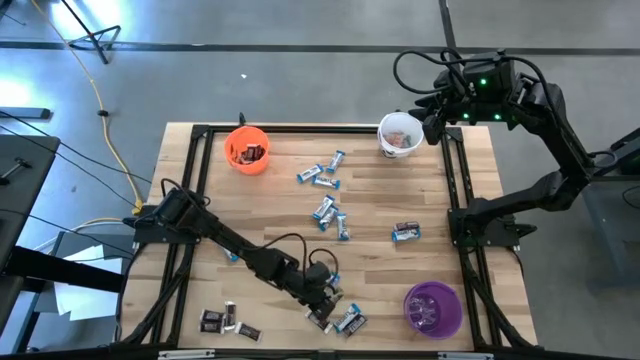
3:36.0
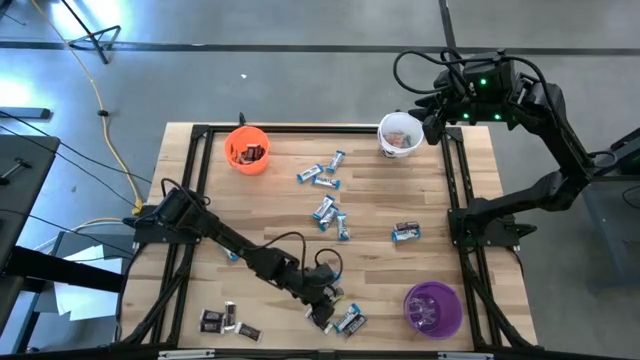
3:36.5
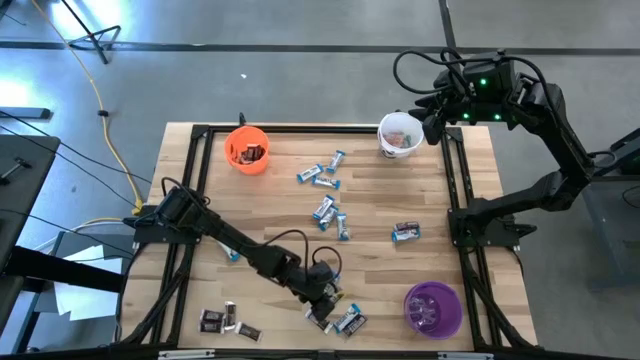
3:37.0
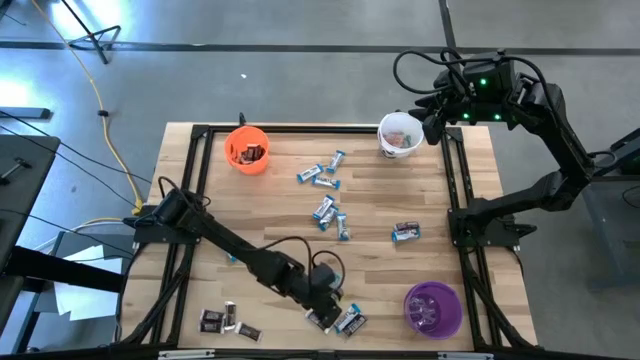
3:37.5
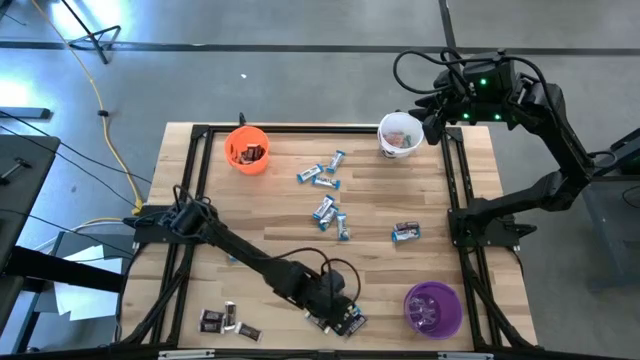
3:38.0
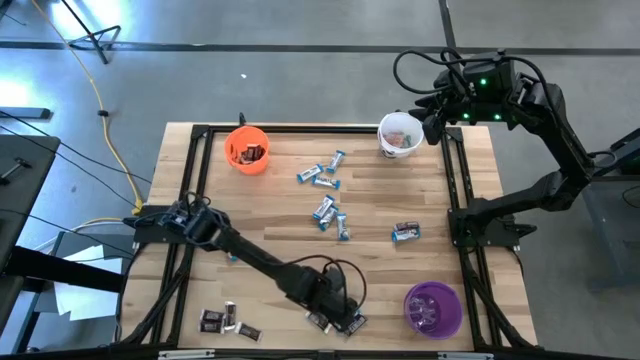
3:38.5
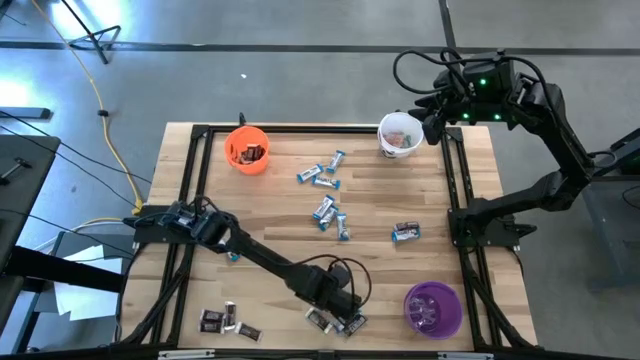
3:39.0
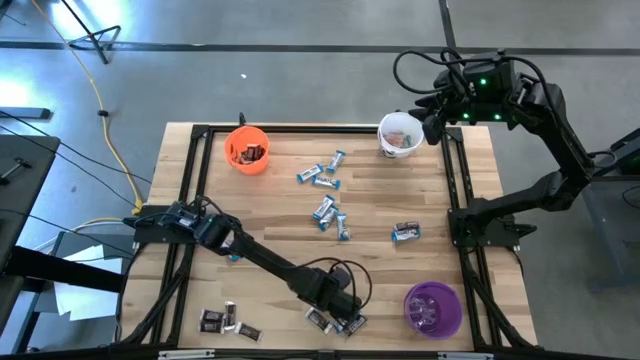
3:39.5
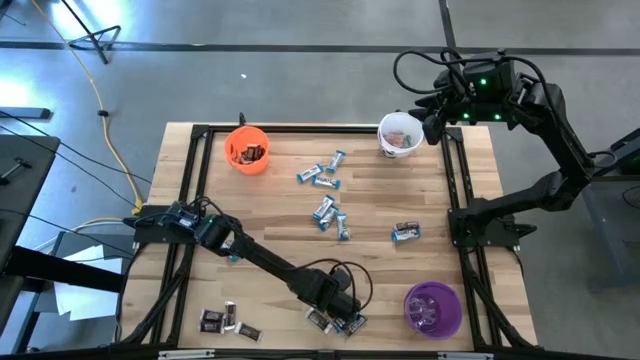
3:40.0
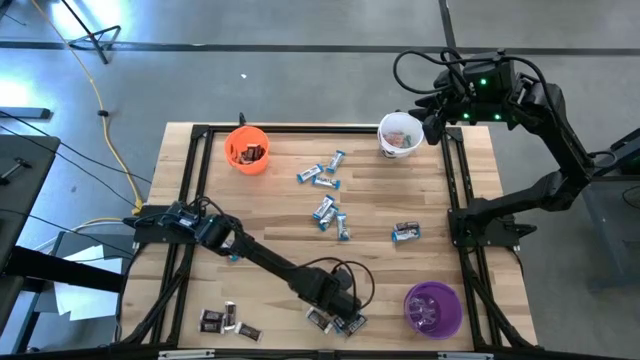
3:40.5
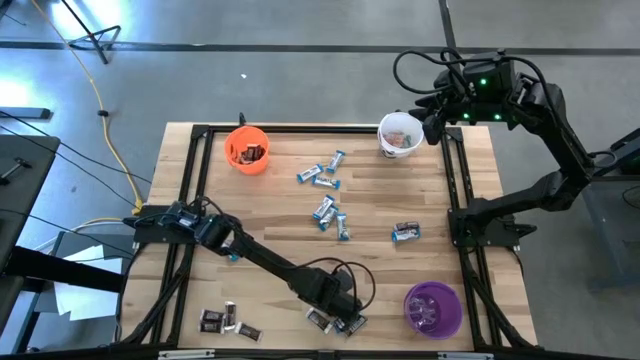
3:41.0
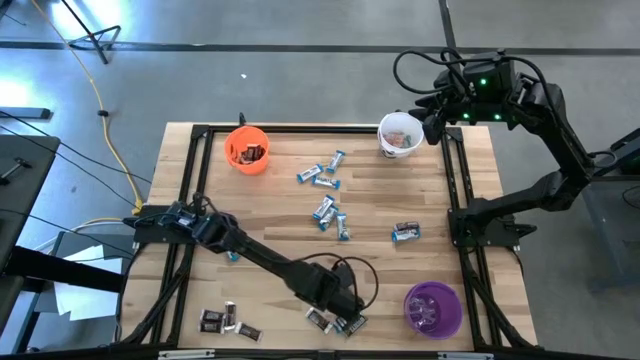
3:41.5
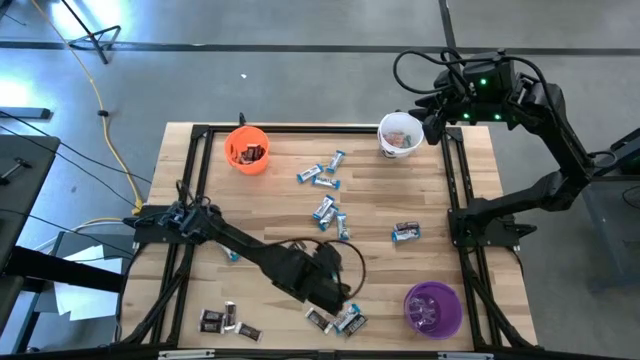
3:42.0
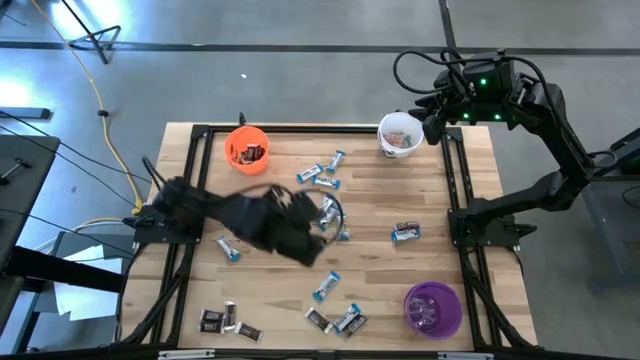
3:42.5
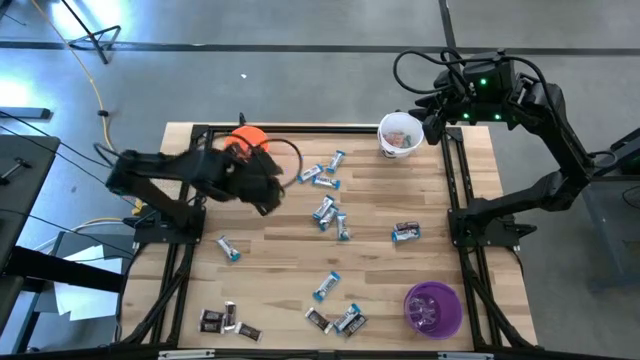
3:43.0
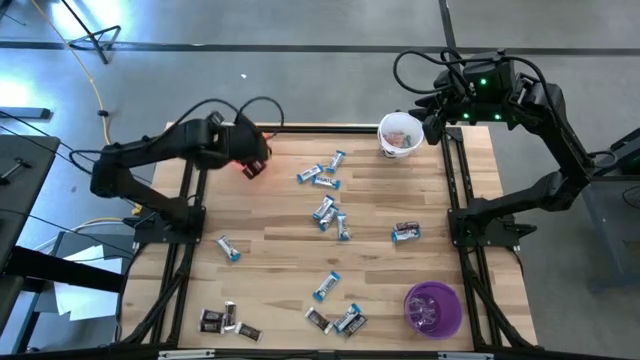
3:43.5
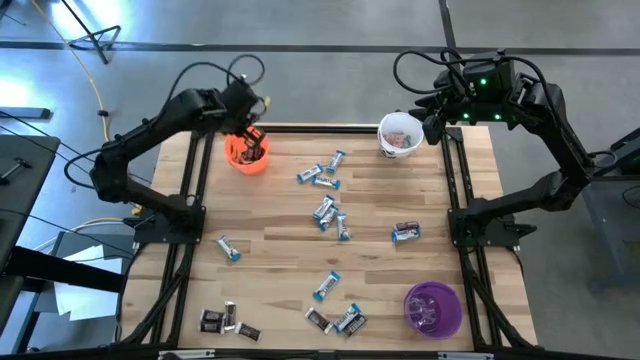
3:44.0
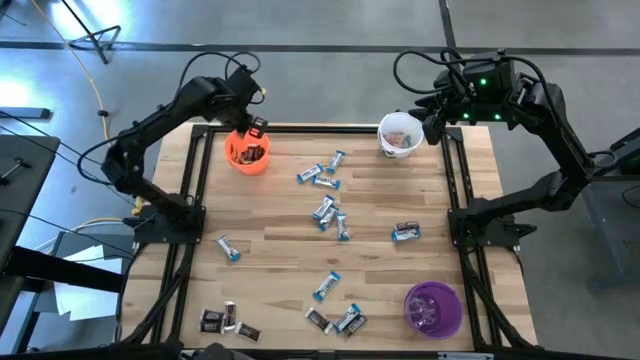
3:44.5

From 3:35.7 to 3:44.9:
Task: Sort candy
Put the brown chocolate into the orange bucket

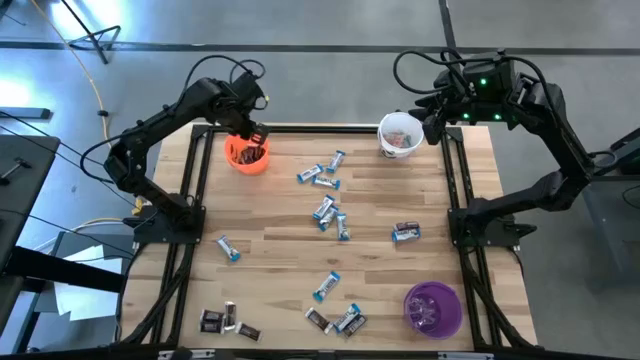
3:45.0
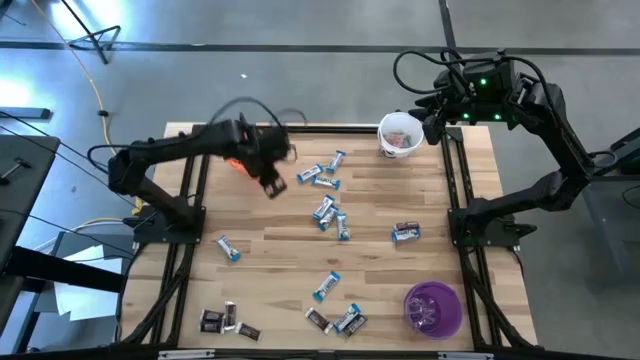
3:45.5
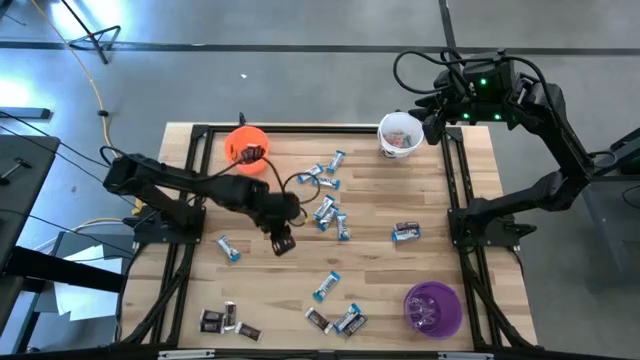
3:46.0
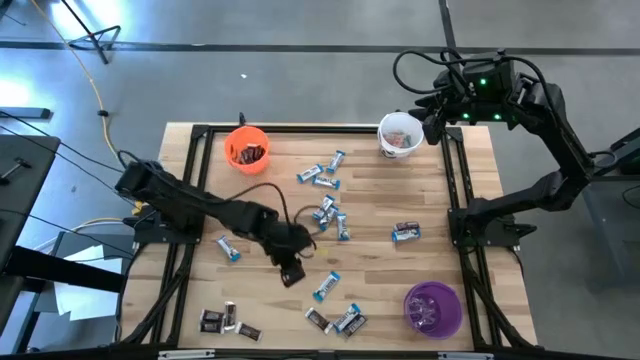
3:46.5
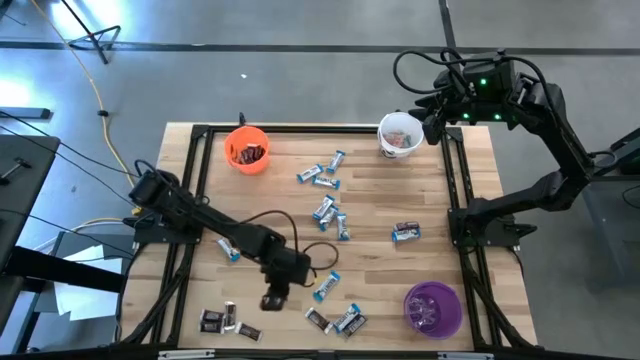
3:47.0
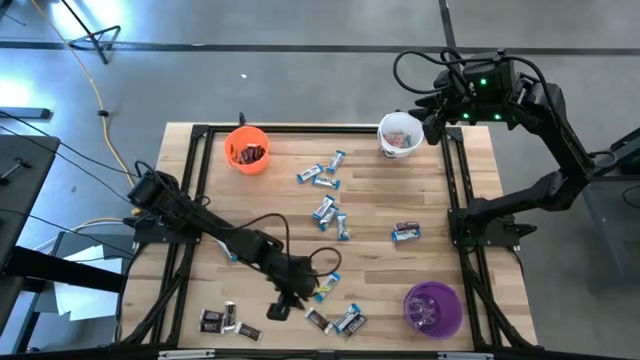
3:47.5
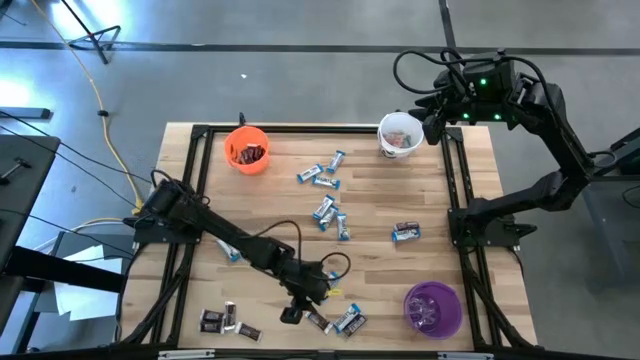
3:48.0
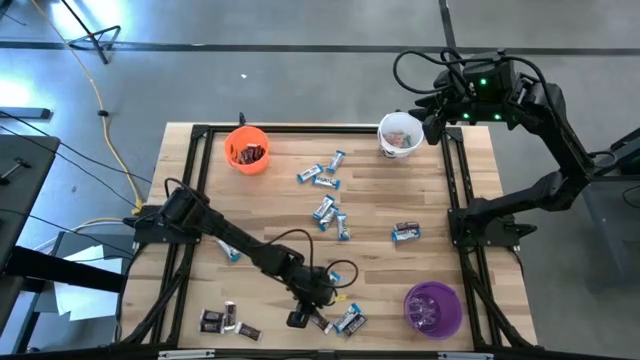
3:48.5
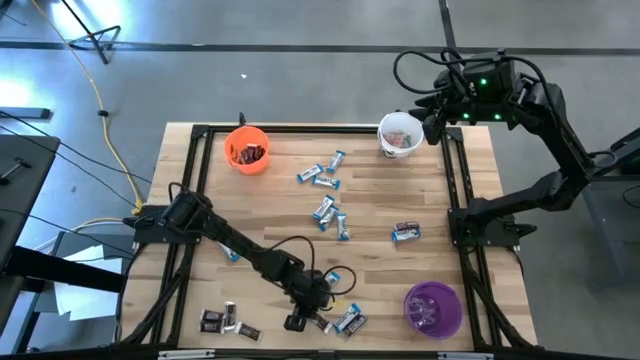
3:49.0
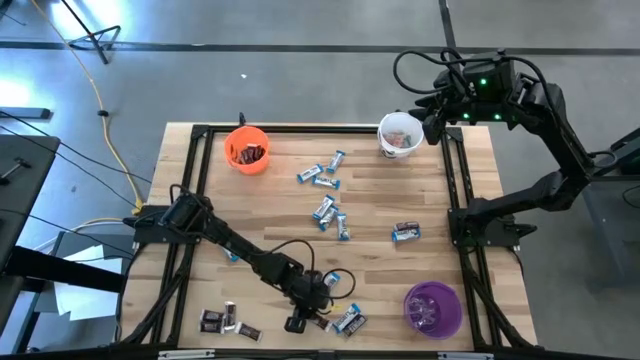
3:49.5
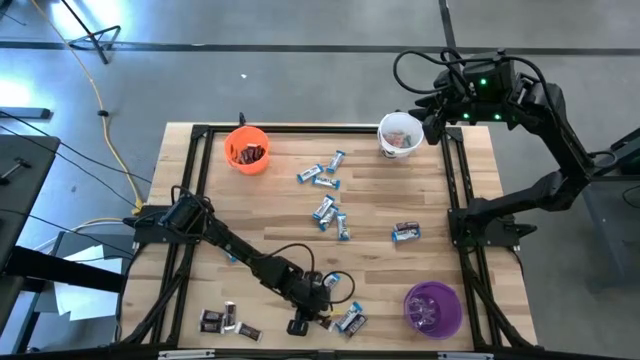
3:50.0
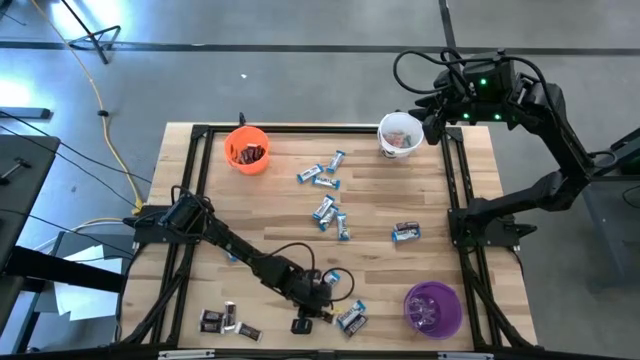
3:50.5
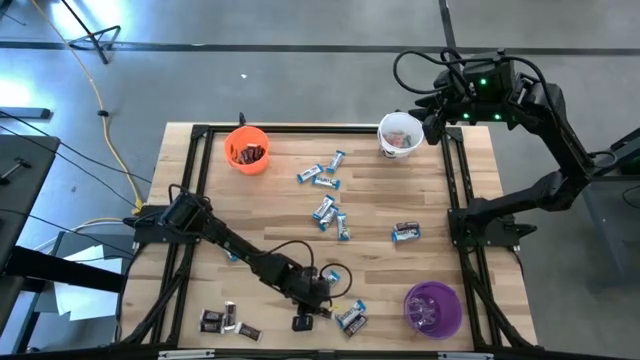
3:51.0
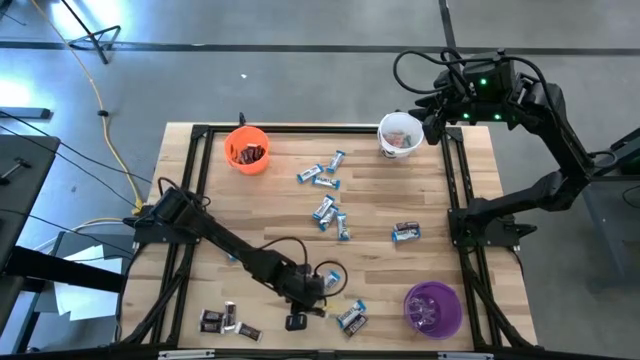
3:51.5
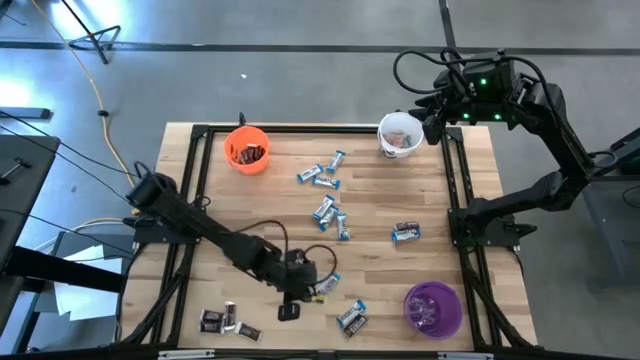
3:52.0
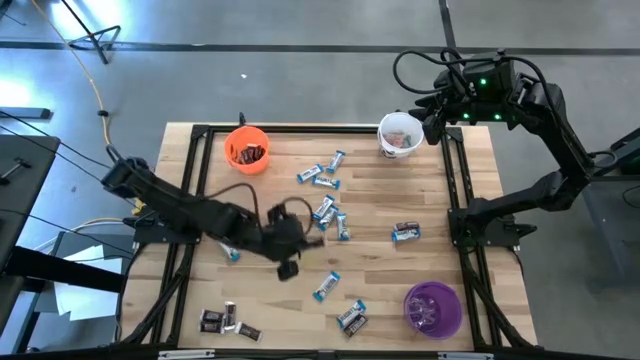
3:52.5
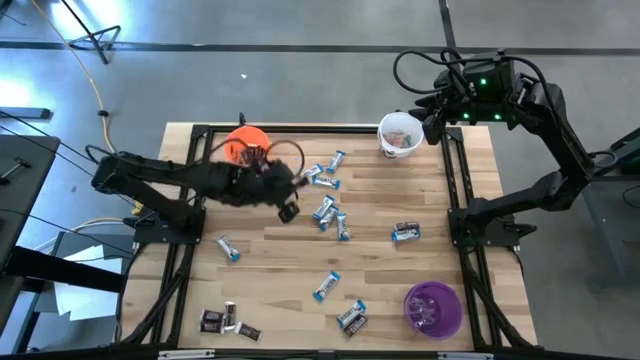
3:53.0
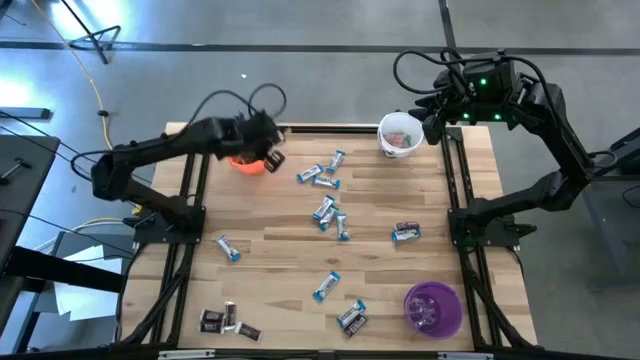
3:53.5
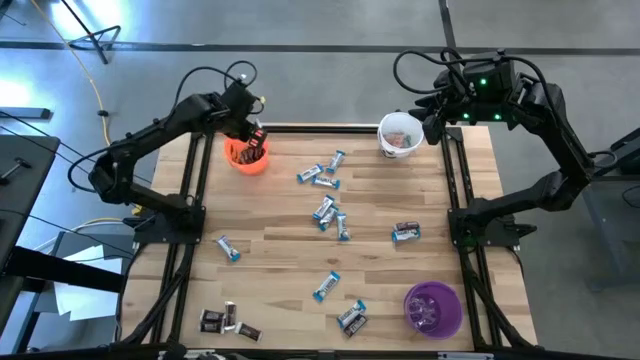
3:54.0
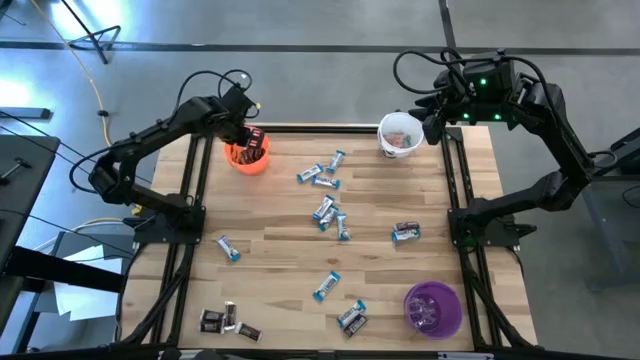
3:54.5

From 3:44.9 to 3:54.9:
Put the brown chocolate into the orange bucket

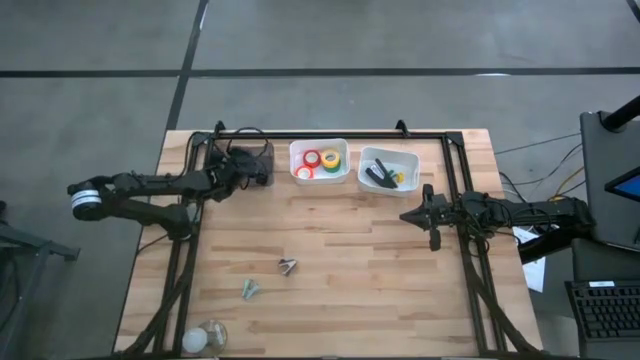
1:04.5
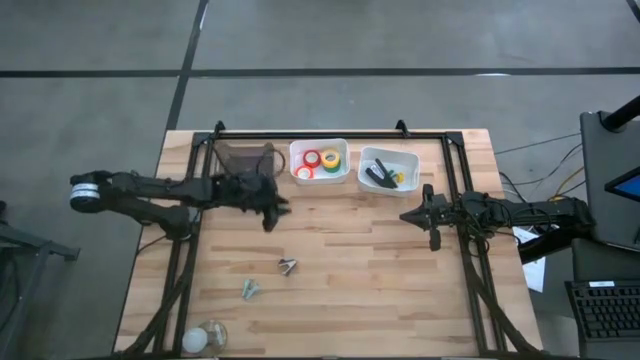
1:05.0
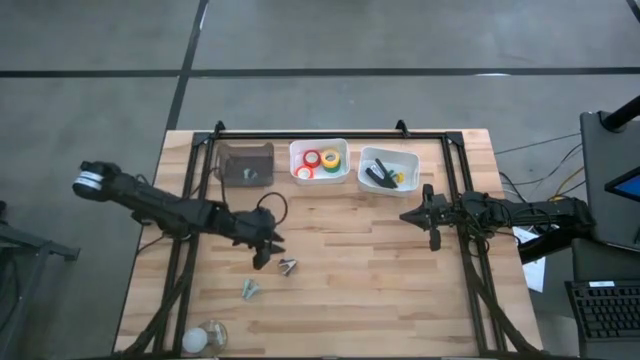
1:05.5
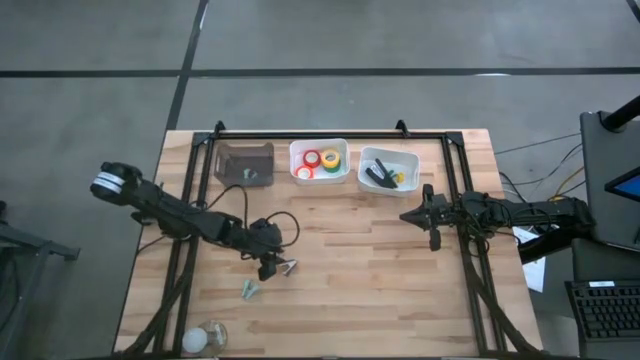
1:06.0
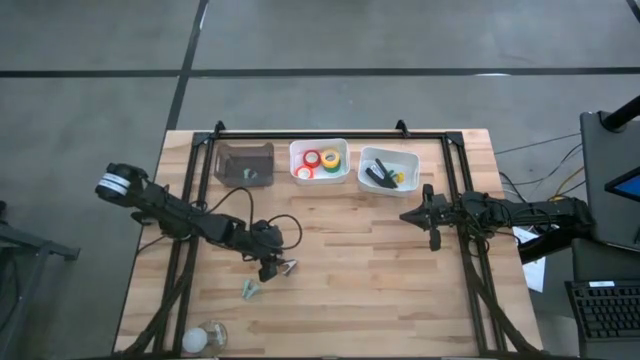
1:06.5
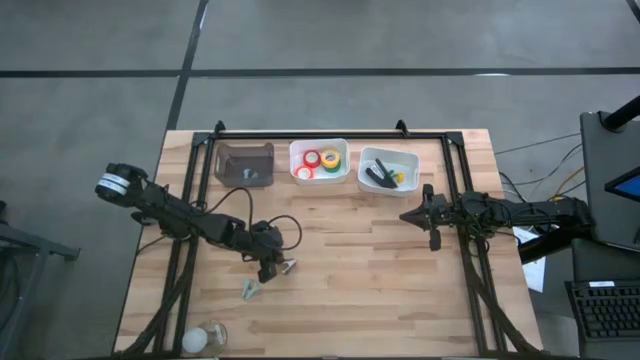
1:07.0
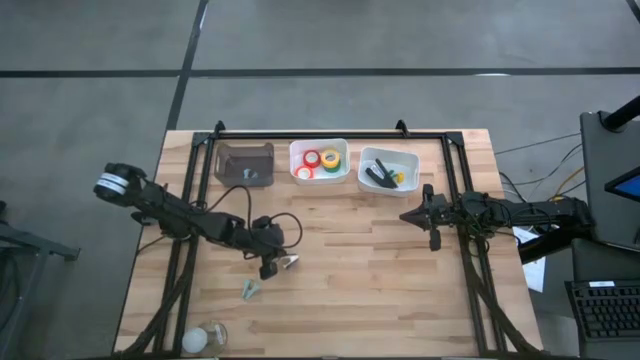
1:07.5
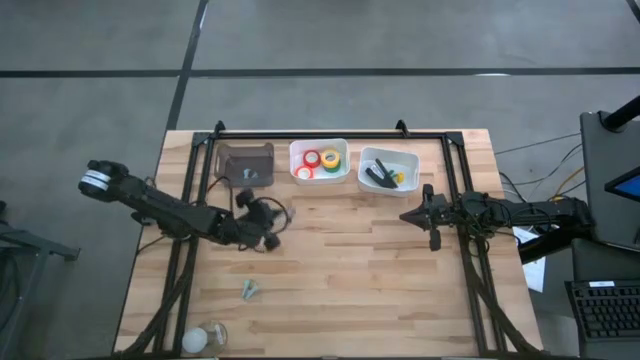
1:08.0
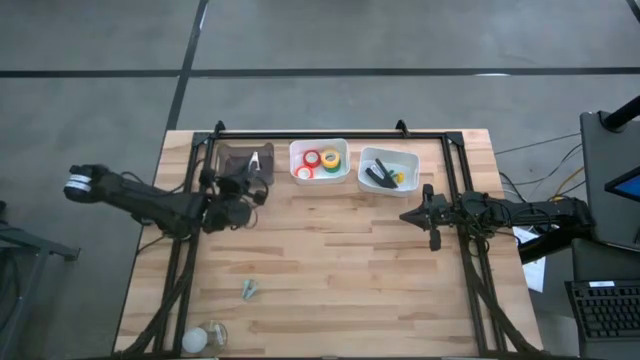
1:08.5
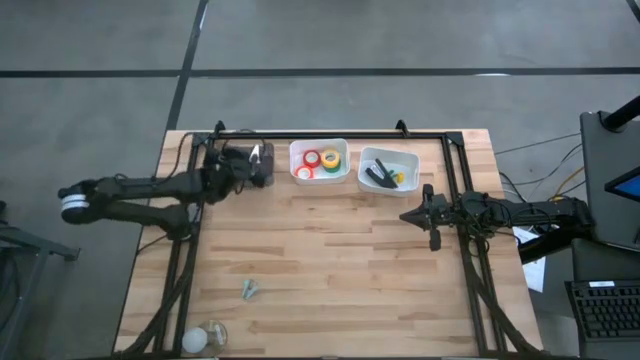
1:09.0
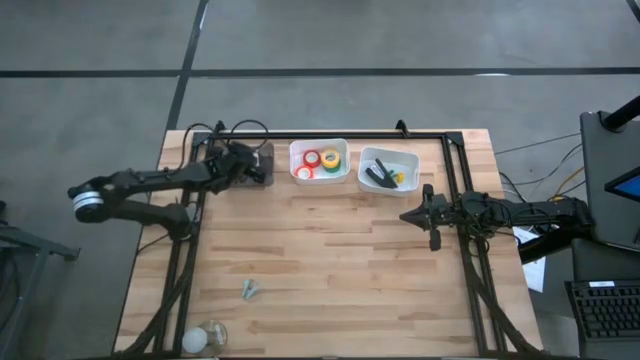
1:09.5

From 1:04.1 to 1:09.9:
Task: Pick and place Stapler, Stapler remover, tape
Put the black staple remover into the black bin
